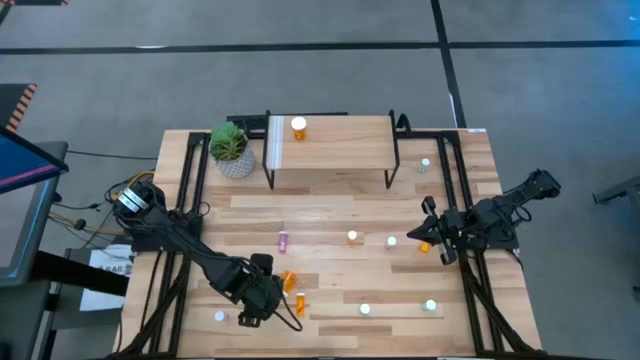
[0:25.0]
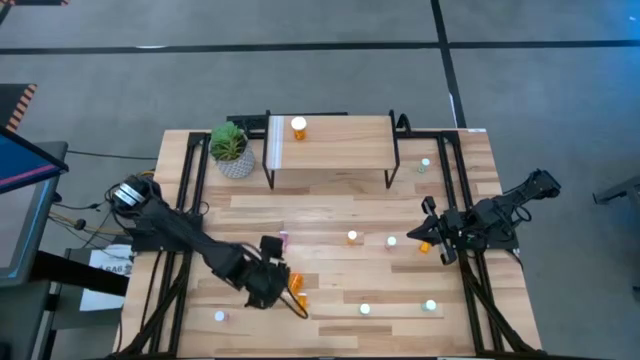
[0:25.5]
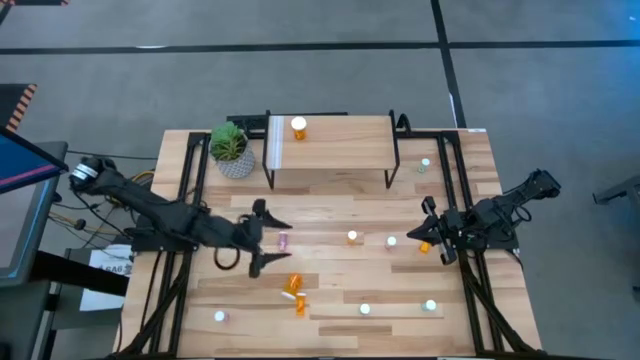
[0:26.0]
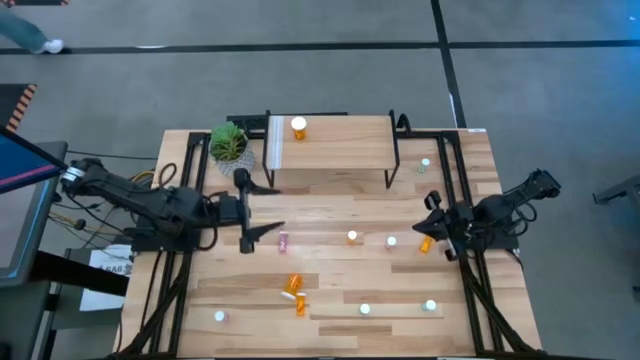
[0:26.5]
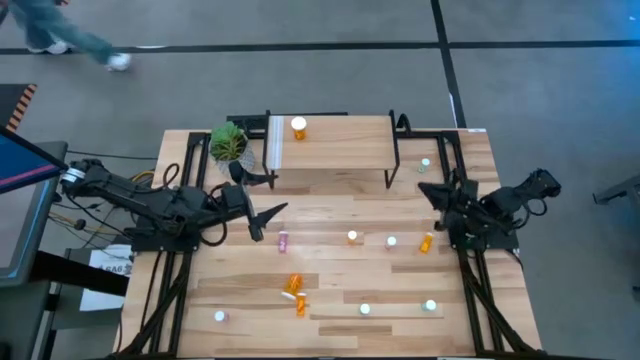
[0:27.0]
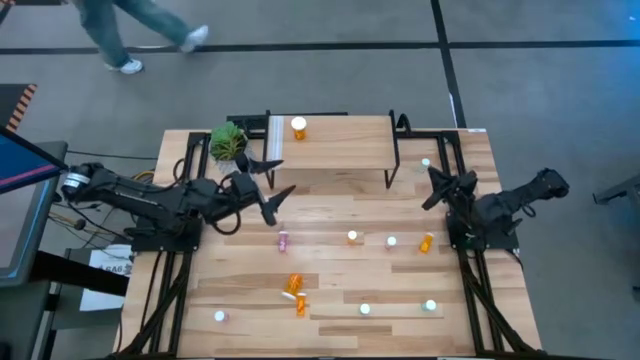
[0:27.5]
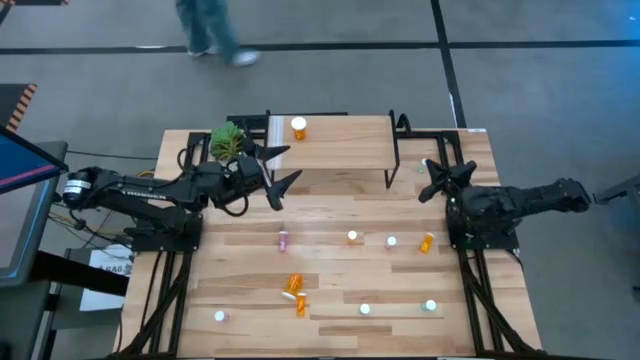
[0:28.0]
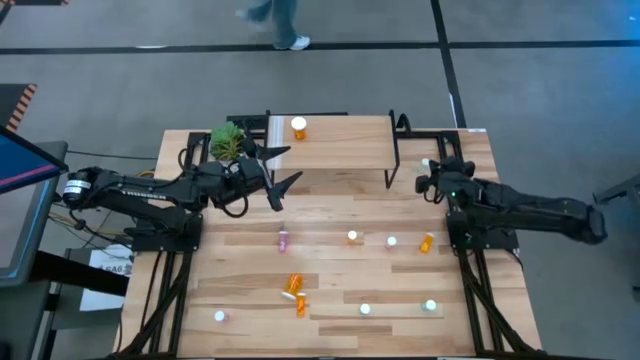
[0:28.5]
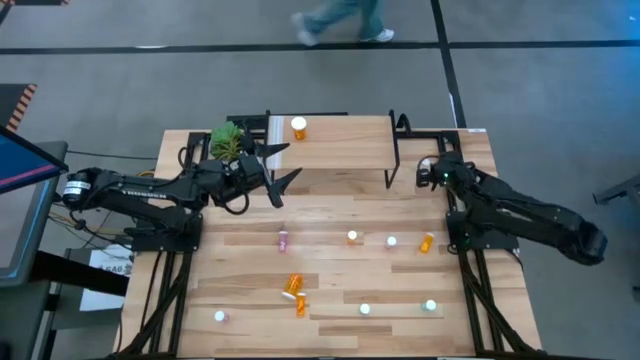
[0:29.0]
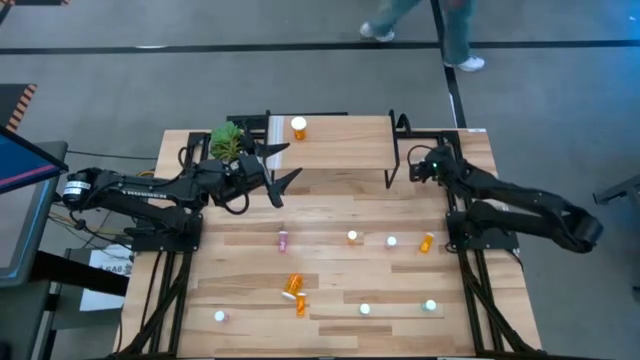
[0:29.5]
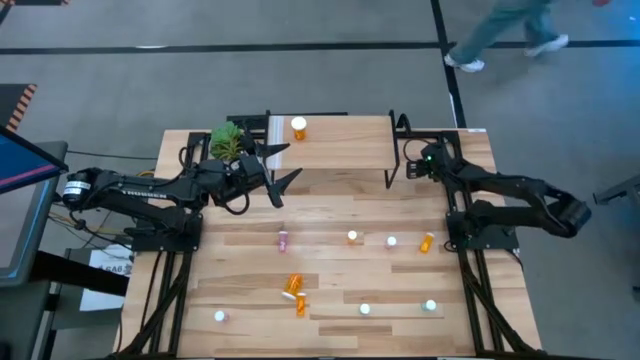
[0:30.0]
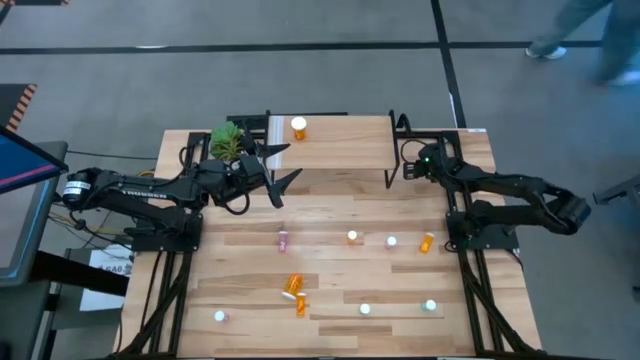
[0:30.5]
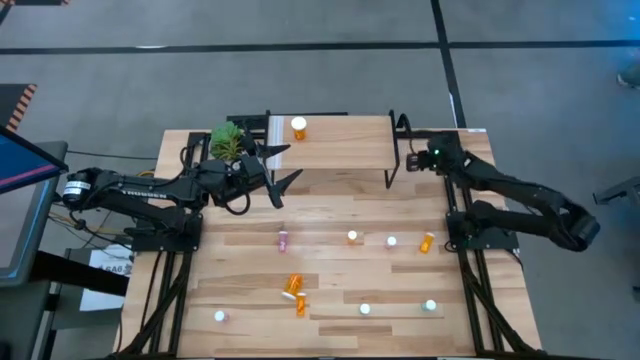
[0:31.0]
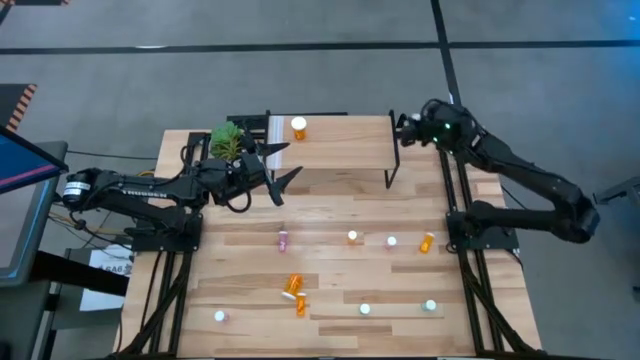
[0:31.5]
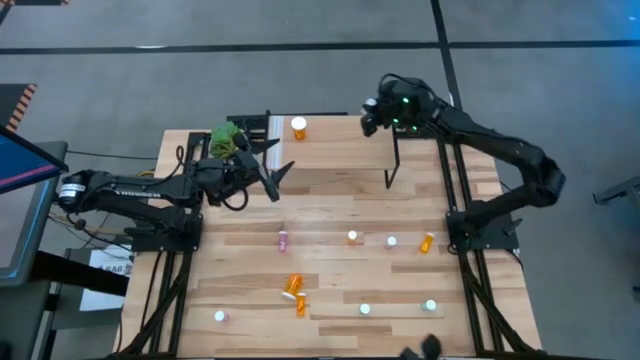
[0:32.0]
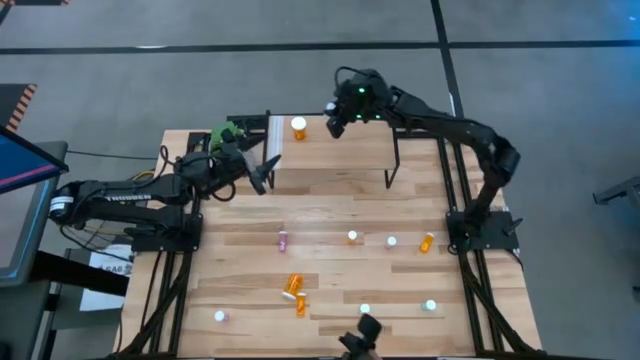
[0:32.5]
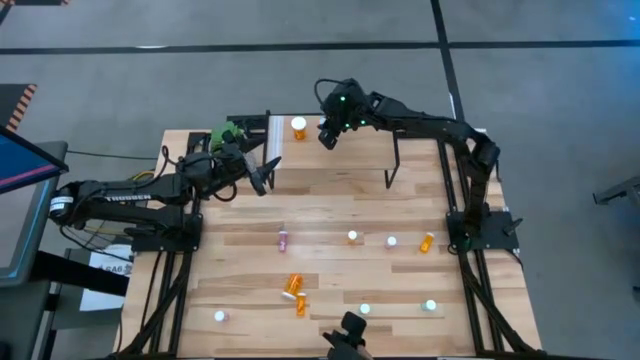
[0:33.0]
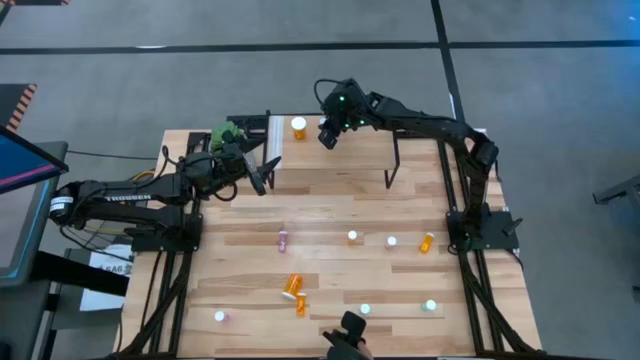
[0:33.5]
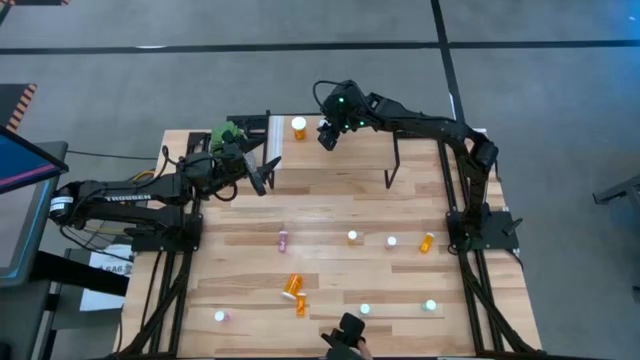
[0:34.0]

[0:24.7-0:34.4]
Task: Pick and place medicine bottles onto shelf by color
Put the blue pill bottle on the shelf

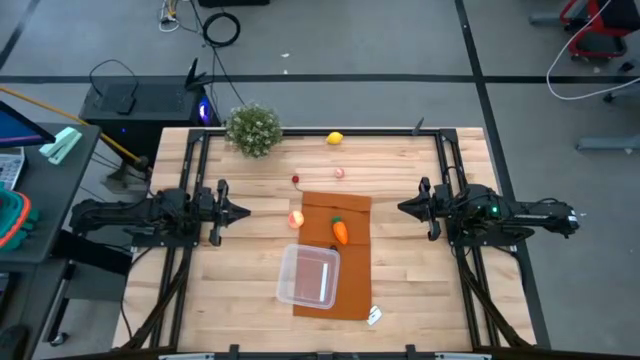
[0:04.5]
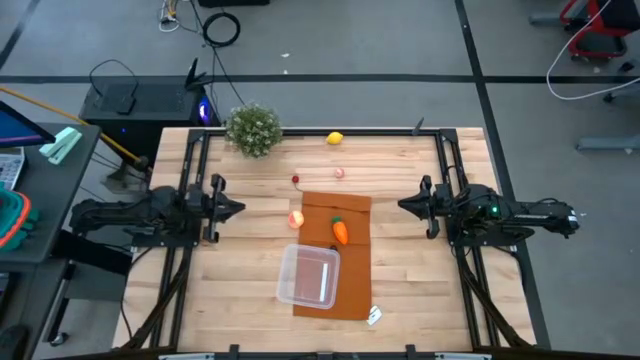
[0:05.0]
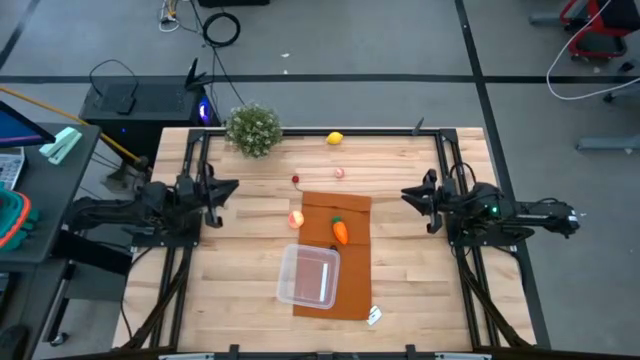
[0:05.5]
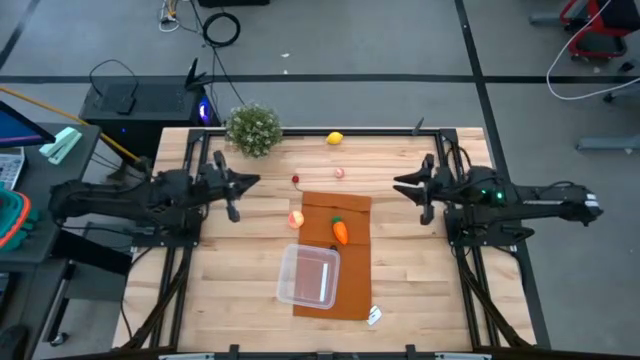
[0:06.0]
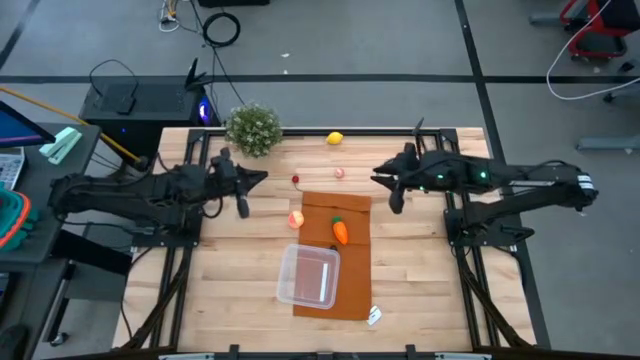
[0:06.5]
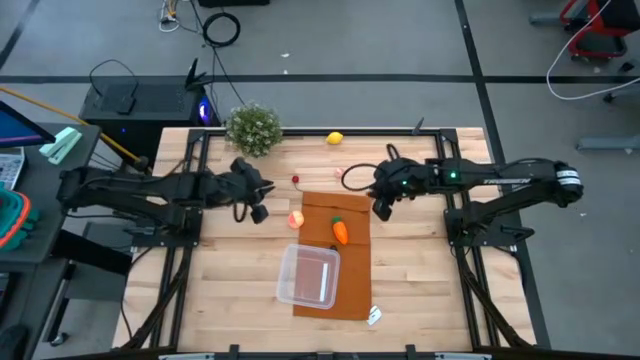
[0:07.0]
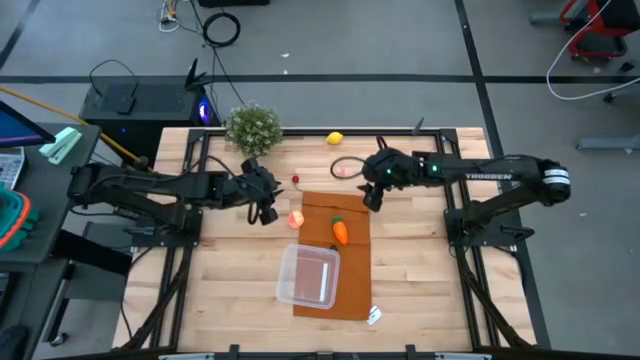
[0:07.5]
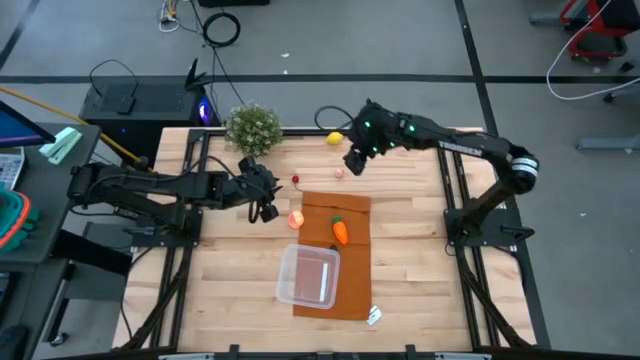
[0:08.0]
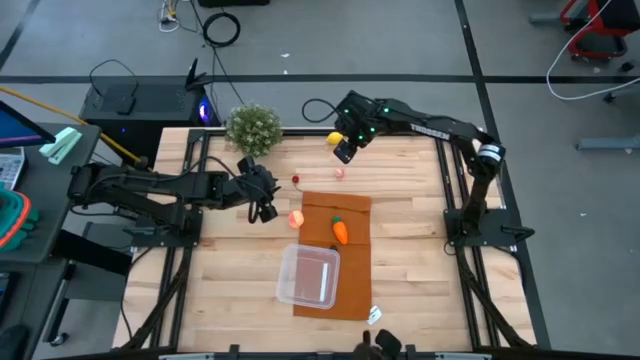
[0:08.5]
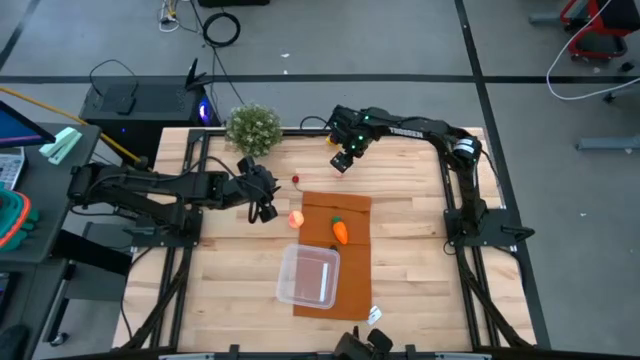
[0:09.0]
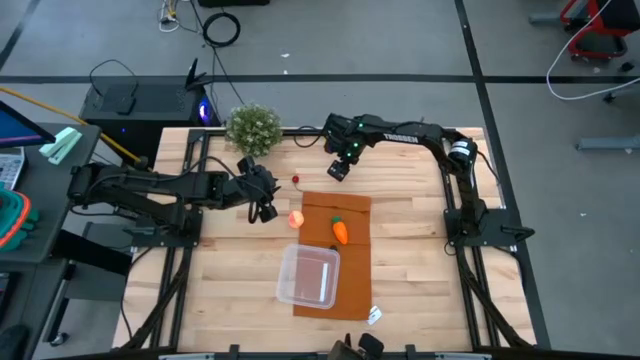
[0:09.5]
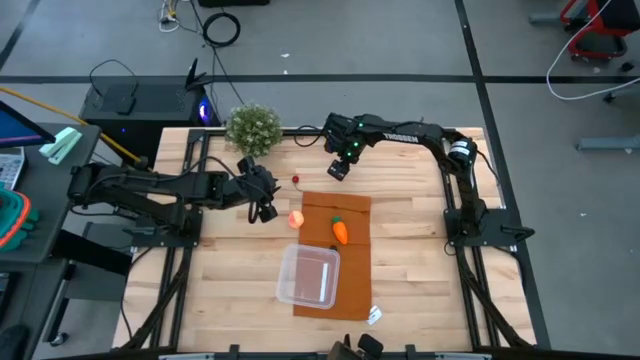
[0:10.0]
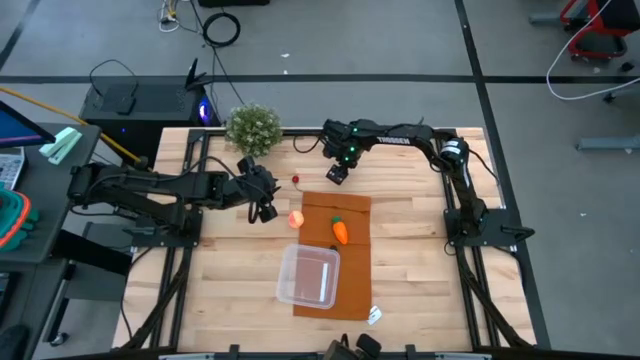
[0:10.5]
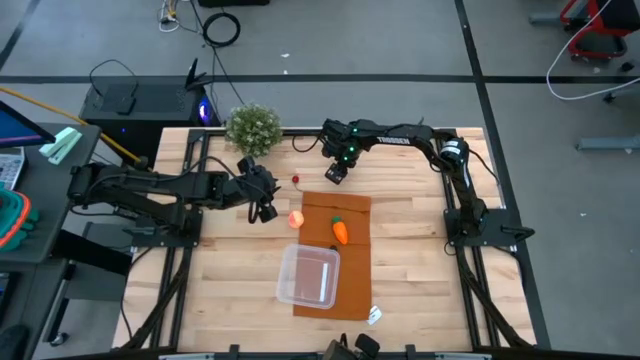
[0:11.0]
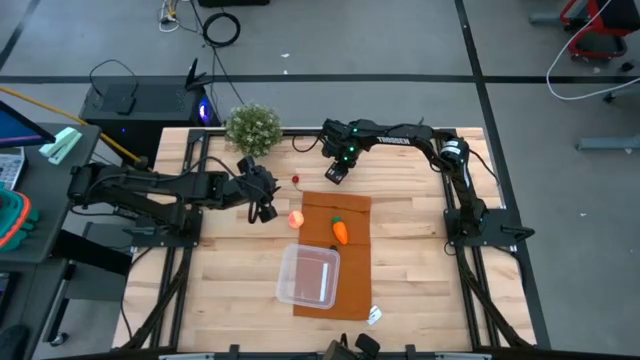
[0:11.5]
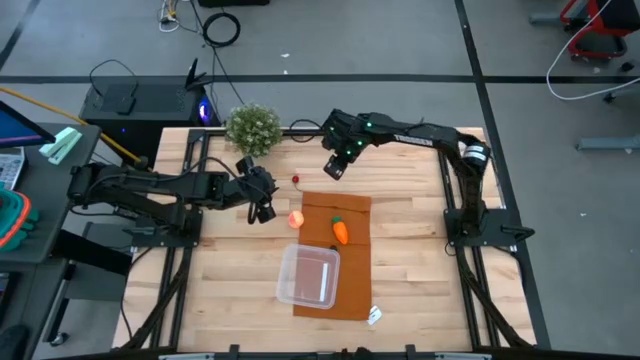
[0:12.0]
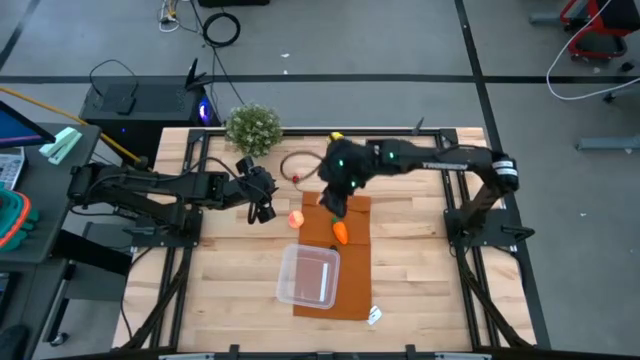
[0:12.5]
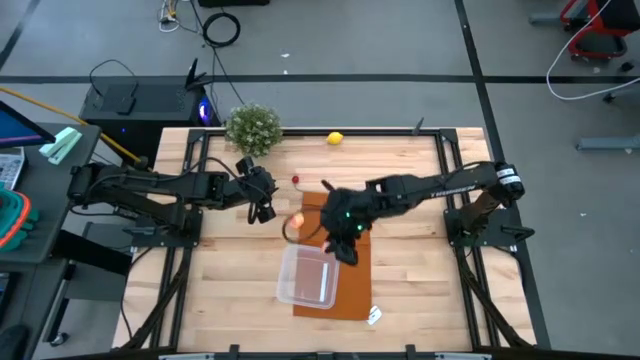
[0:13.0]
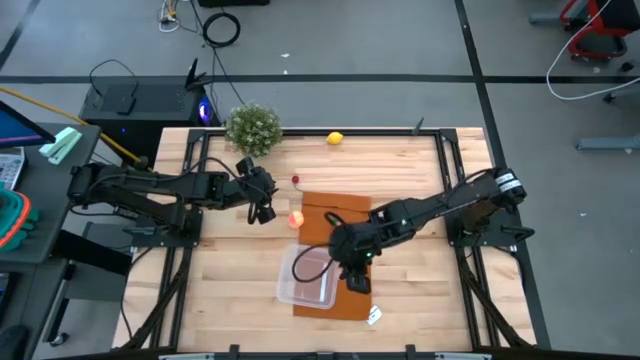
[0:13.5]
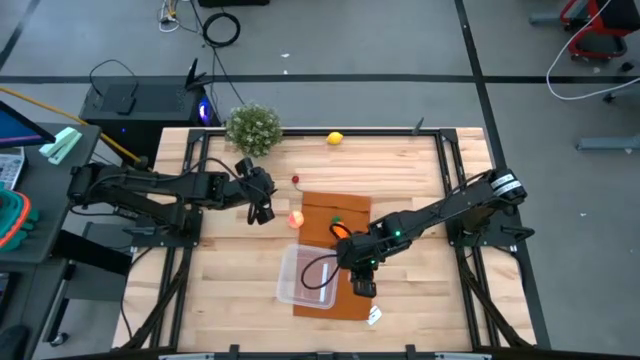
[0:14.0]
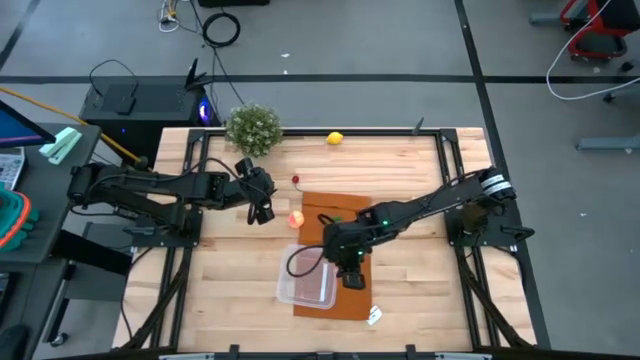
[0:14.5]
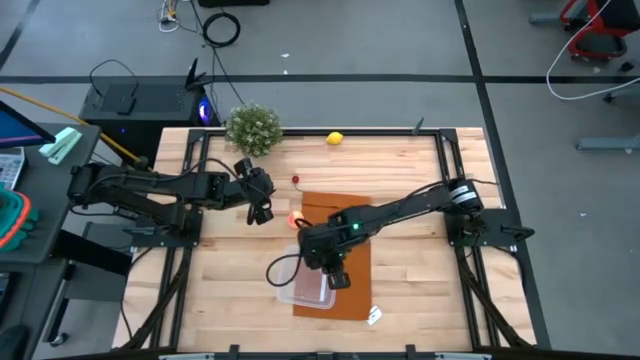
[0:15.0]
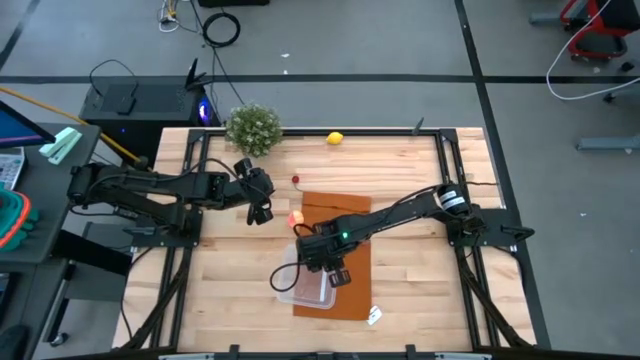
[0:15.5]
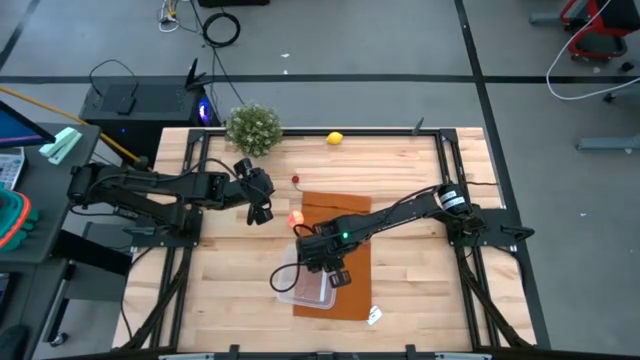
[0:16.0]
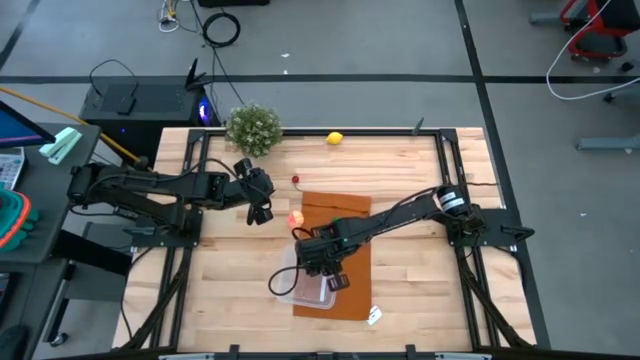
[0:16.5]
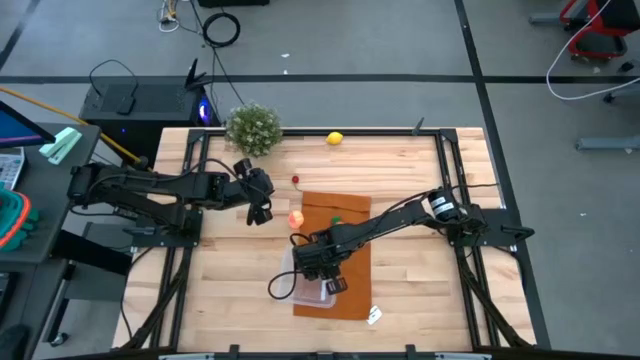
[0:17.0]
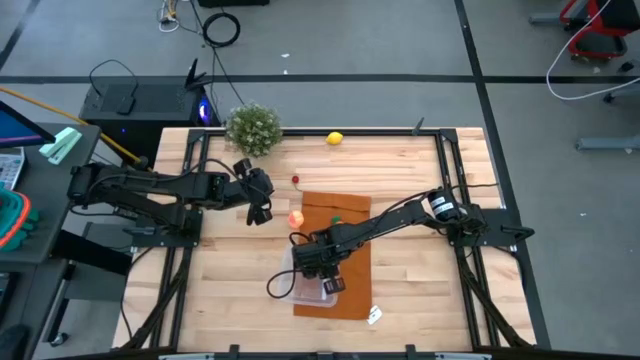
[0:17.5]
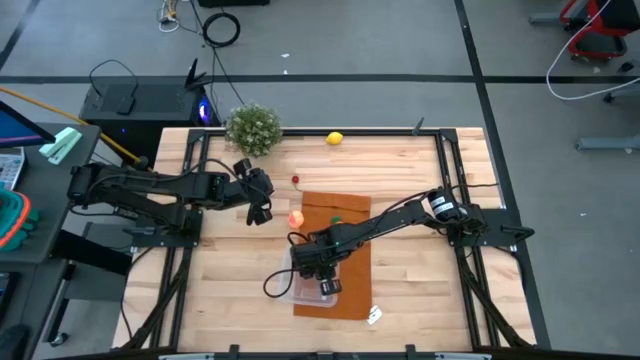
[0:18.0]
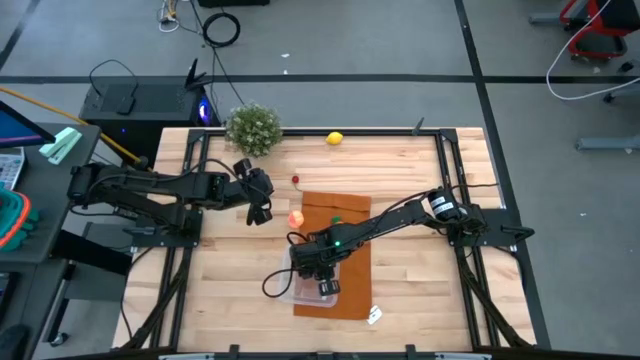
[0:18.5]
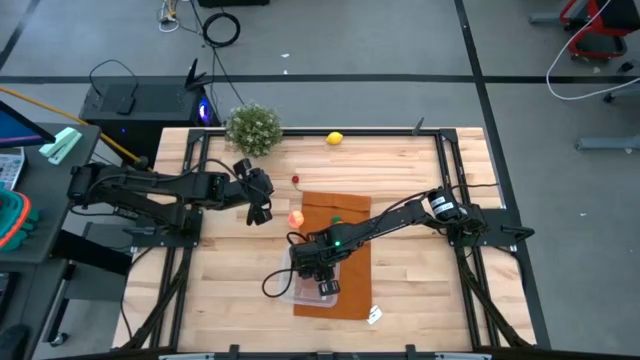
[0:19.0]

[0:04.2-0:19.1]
Task: Pick and placing Produce into tupperware
Put the small pink peach into the transparent bin
